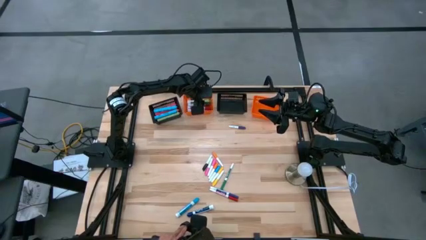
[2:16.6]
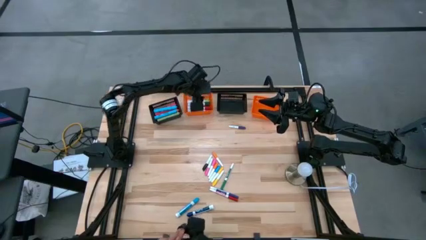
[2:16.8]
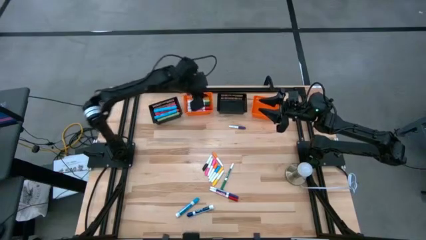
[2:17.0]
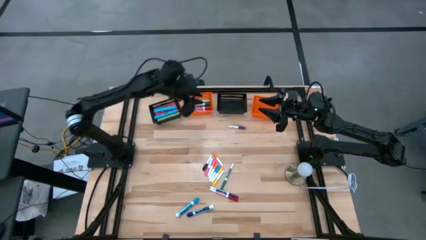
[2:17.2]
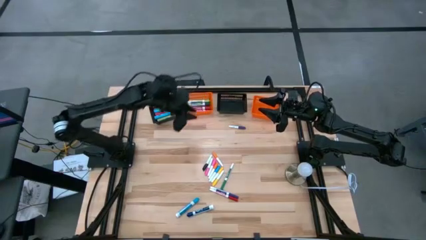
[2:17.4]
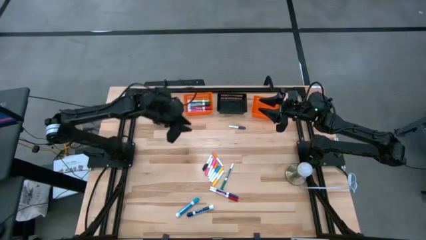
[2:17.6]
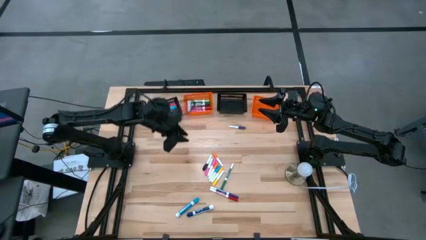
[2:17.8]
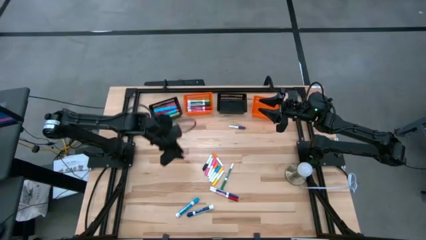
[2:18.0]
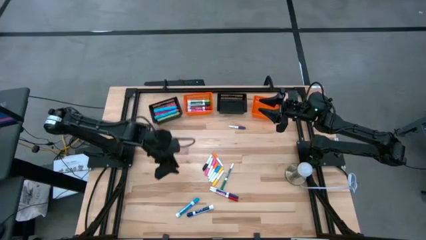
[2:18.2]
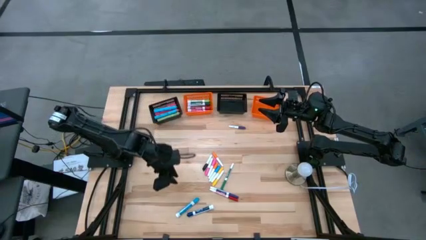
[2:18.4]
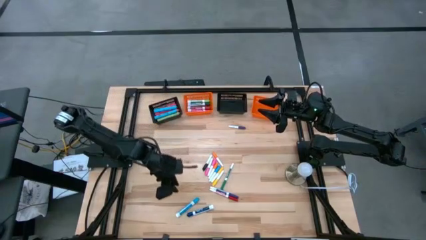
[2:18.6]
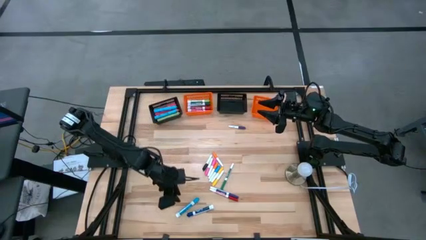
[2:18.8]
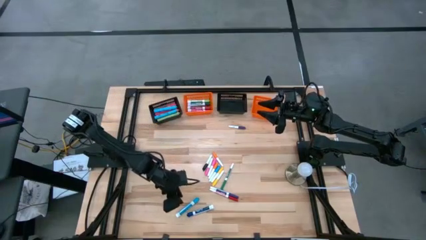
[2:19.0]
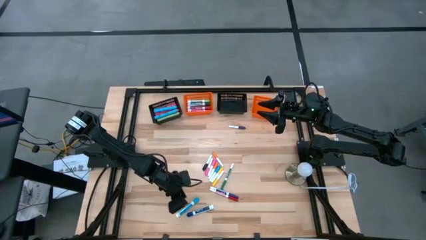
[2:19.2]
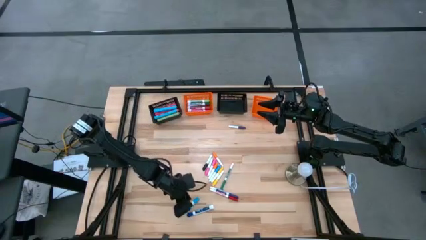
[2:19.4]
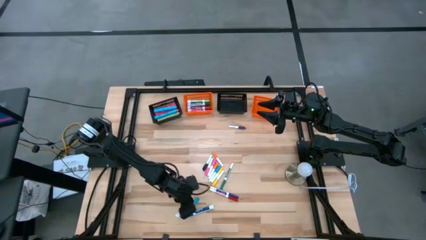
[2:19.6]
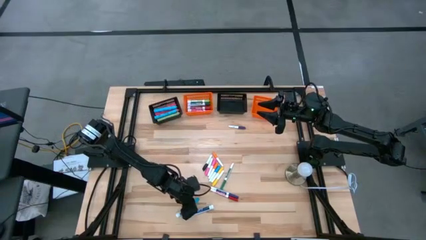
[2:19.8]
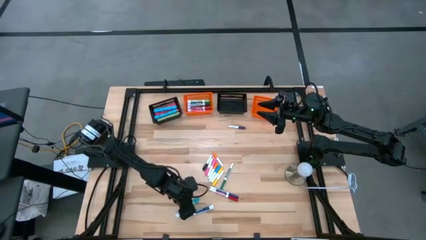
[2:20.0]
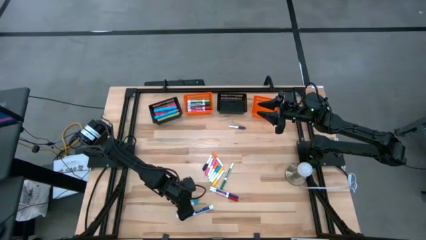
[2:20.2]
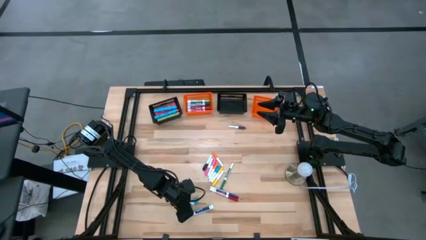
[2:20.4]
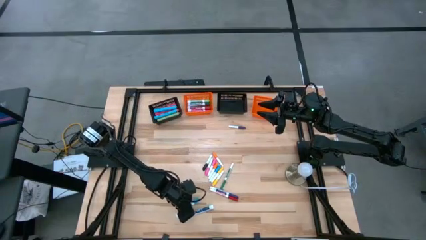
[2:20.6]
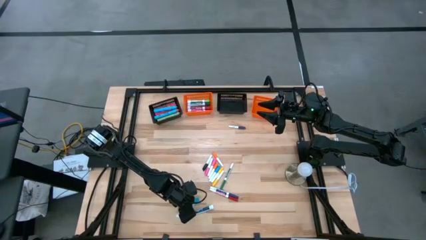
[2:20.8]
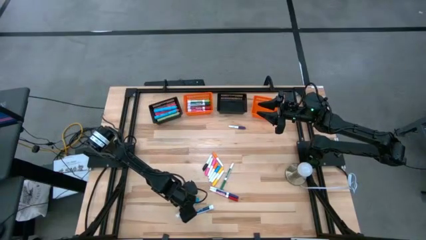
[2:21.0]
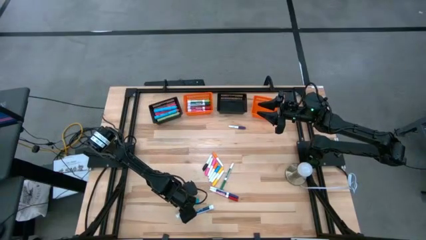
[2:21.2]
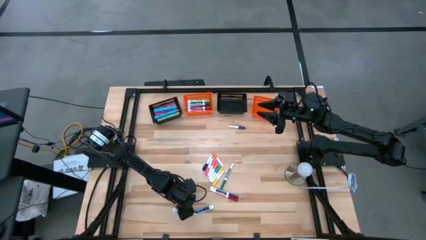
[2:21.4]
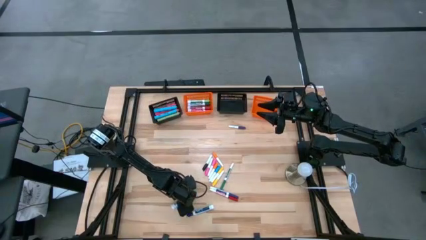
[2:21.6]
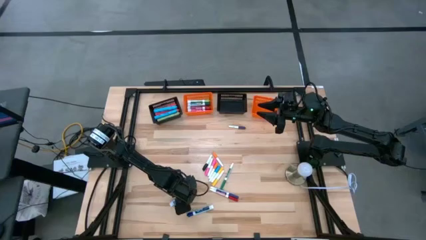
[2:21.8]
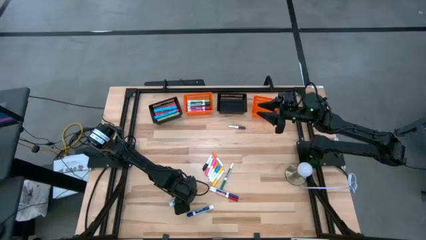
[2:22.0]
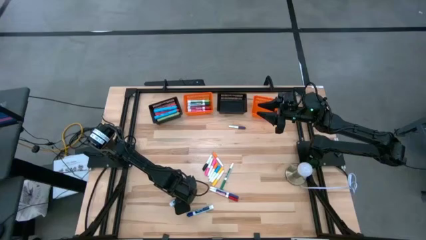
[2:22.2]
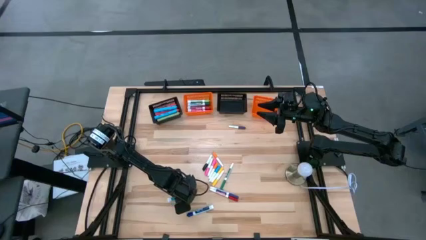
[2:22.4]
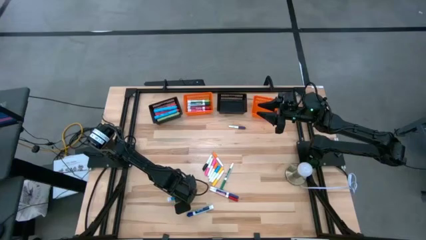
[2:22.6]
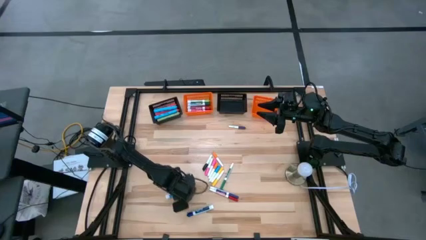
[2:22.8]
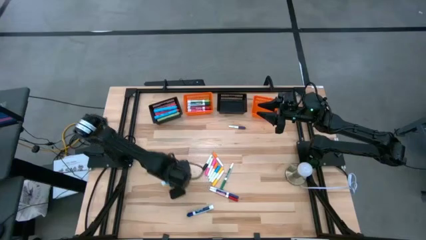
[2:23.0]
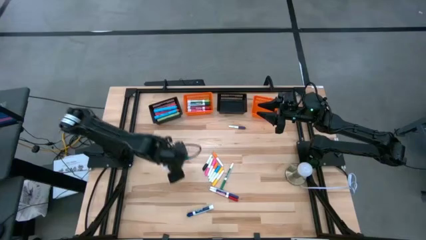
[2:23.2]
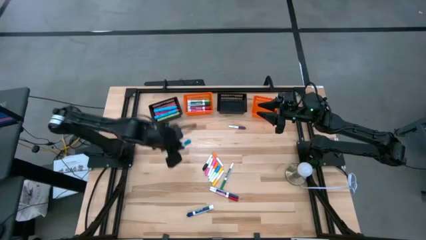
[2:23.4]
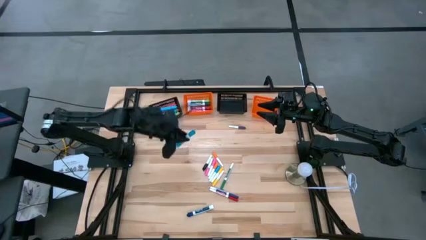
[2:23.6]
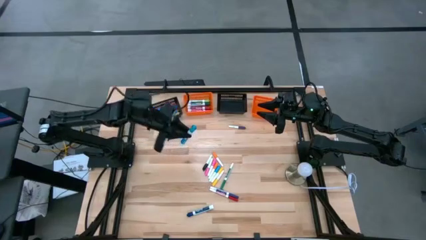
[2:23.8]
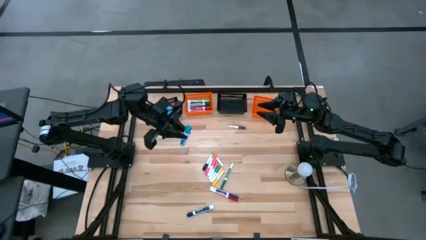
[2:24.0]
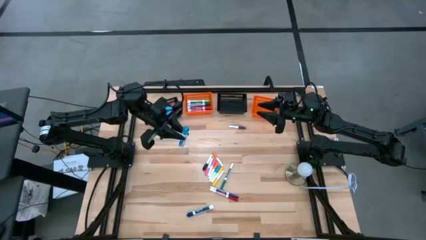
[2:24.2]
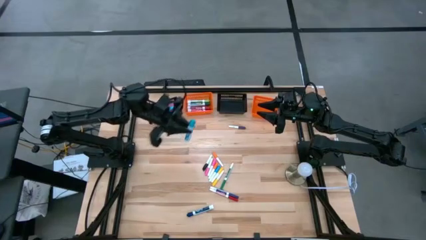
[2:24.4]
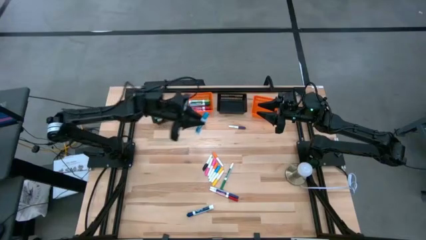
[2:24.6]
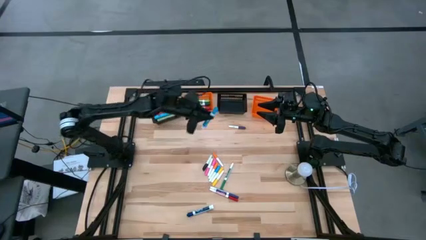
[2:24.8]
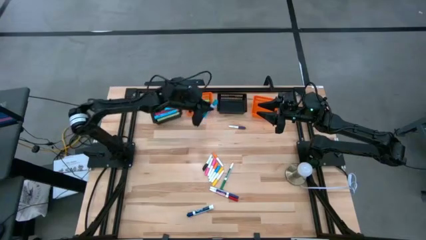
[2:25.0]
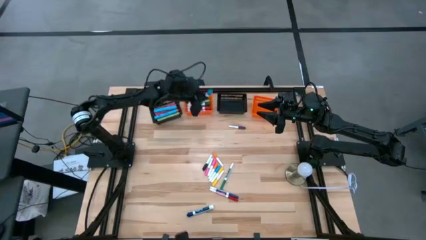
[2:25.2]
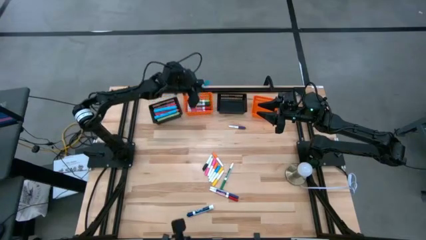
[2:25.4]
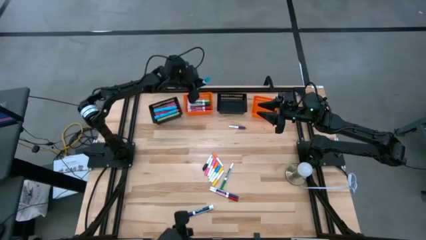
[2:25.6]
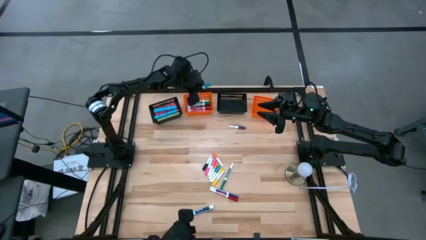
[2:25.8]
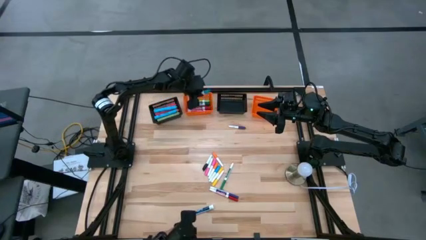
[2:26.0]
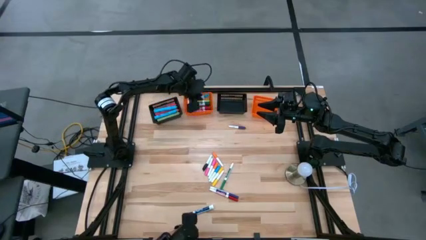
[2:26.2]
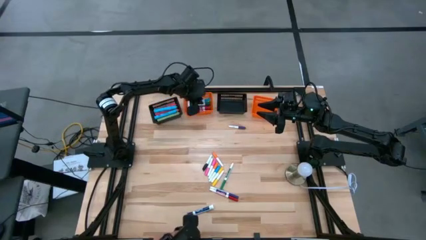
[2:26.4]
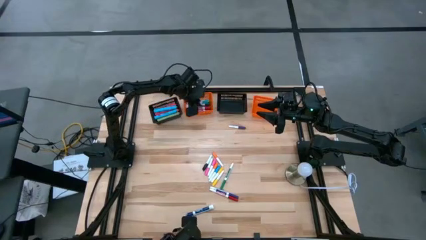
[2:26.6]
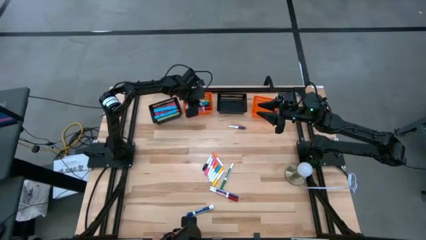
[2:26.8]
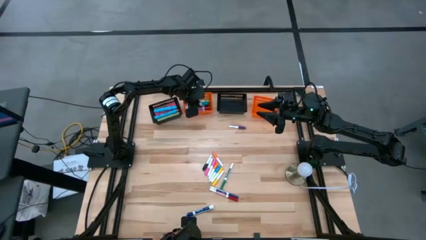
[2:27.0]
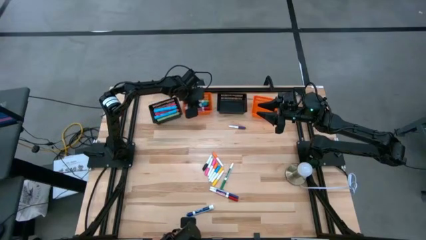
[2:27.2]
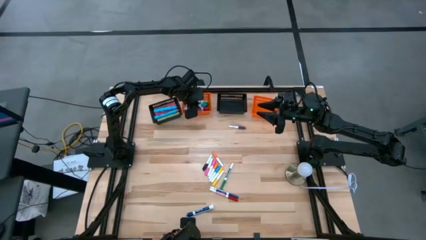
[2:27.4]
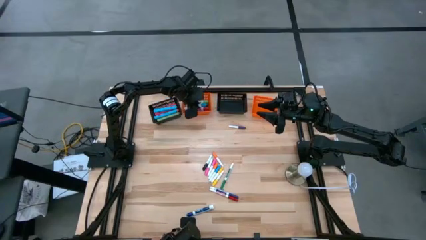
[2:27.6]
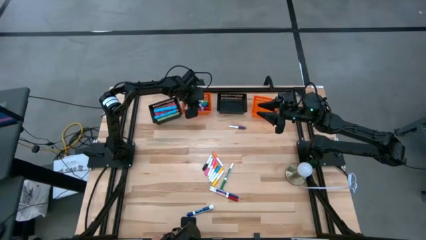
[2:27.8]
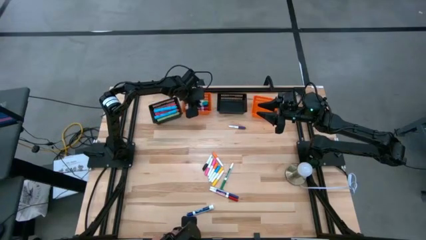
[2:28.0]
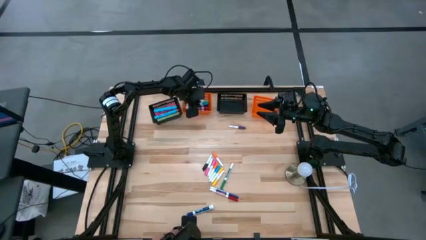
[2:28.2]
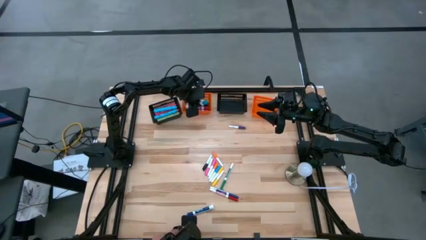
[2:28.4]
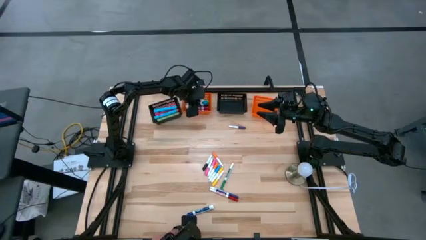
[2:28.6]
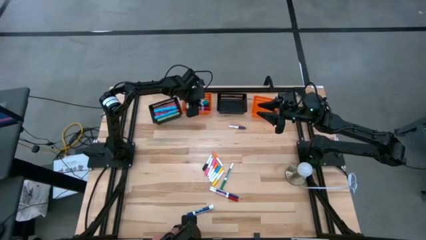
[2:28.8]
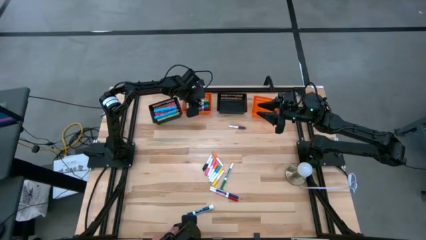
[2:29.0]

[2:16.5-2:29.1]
Task: Pick & Place Markers
Put the light blue marker pen into the left orange bin

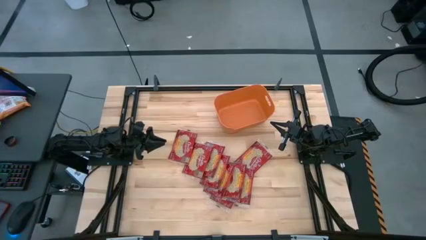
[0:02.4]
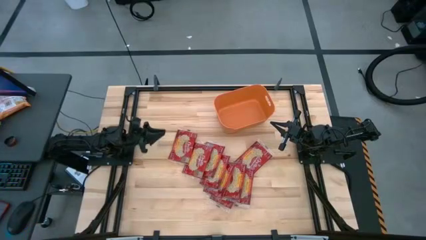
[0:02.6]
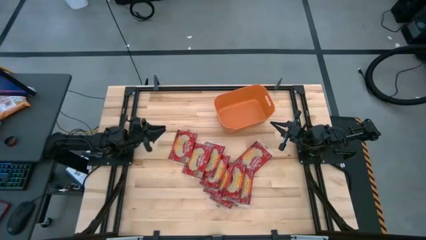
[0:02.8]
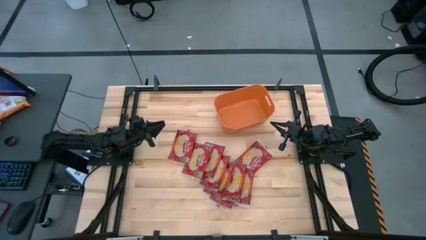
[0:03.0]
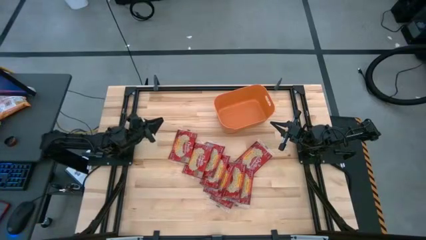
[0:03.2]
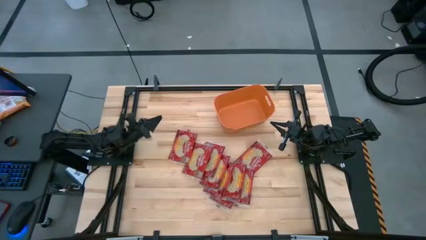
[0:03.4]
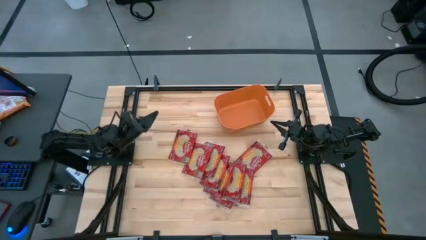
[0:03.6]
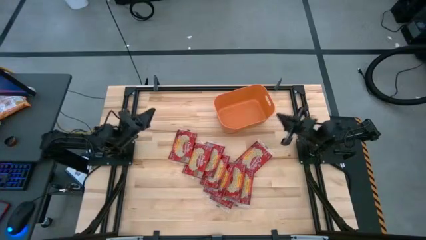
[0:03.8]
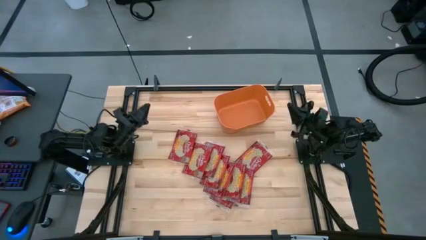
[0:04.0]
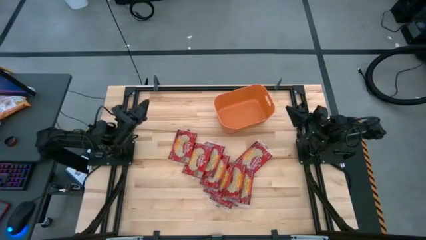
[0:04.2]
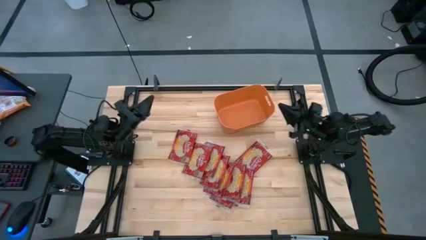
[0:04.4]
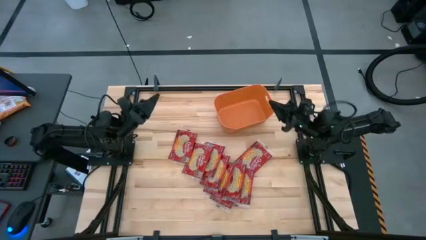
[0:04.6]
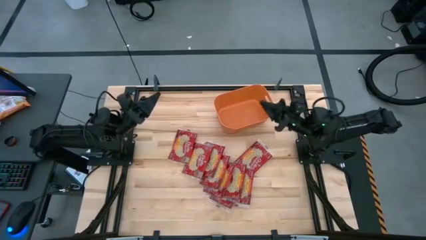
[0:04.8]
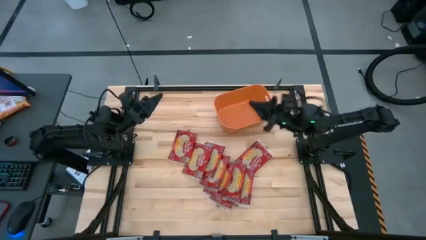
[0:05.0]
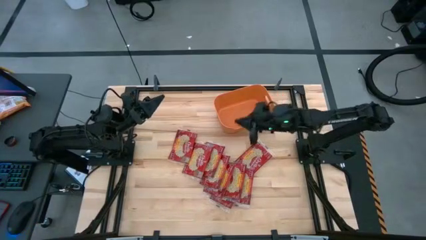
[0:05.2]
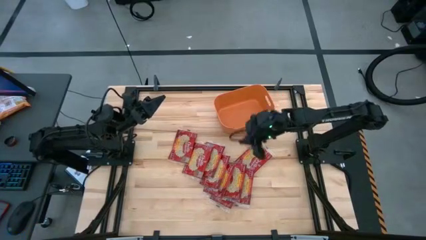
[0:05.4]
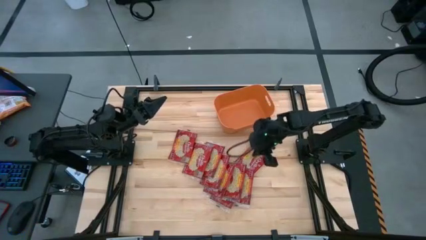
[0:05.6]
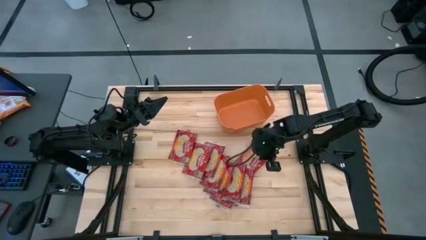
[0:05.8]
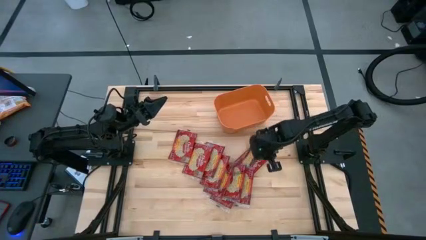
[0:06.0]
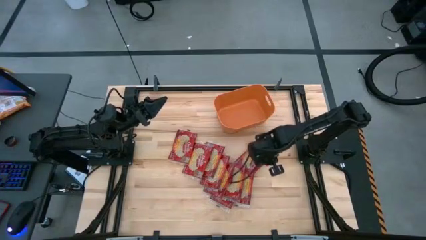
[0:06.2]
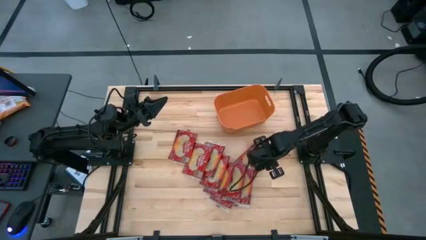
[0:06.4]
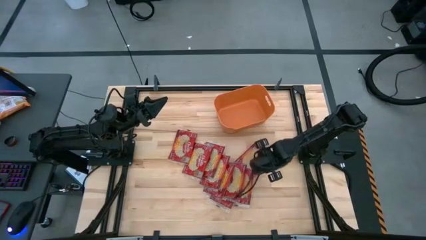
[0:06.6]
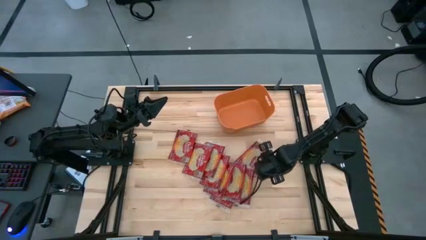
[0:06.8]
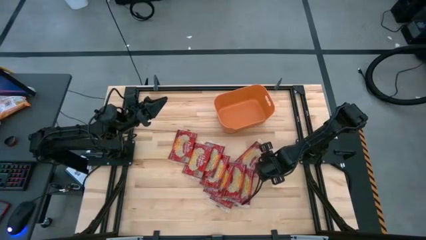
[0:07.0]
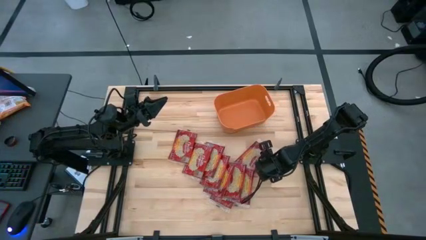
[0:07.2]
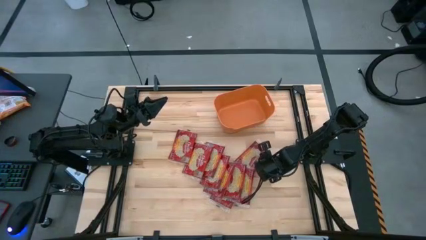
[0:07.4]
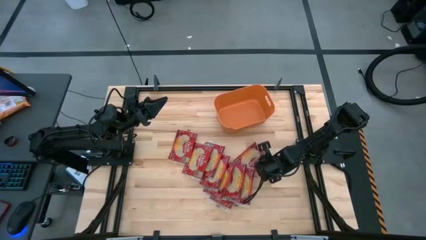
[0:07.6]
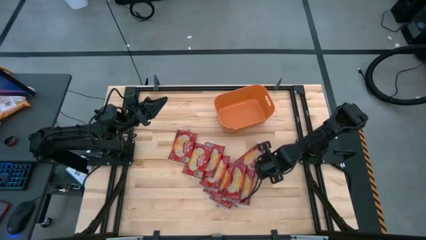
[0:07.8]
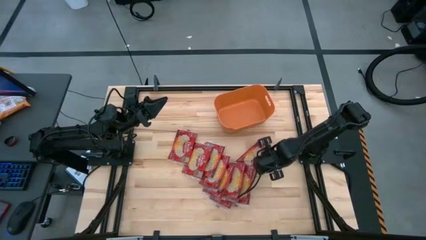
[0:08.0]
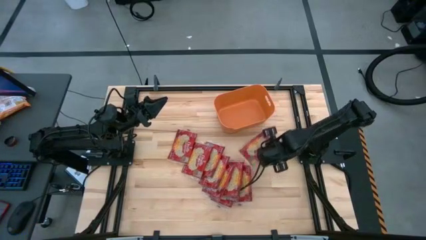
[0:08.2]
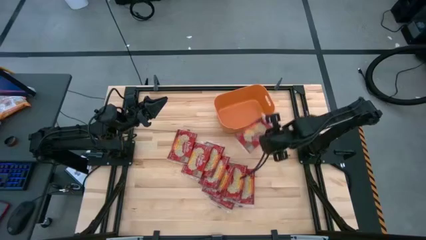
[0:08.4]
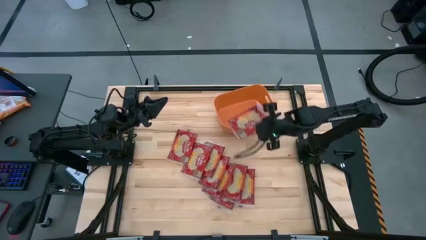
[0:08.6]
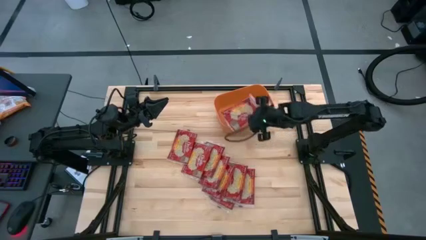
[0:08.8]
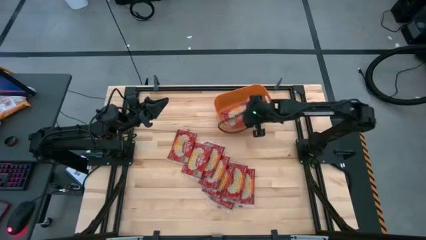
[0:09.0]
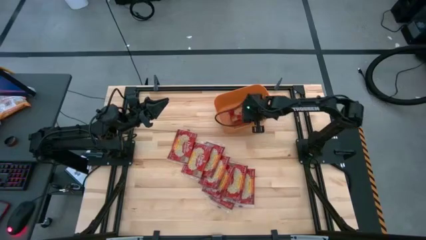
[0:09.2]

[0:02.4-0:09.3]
Task: Sort popcorn bags into baskets
Put the red popcorn bag into the orange bin
